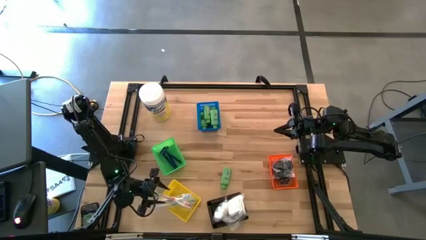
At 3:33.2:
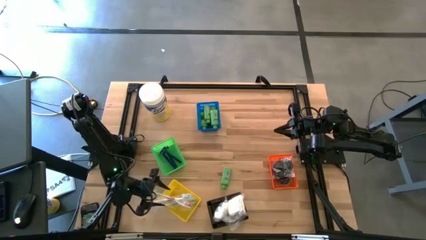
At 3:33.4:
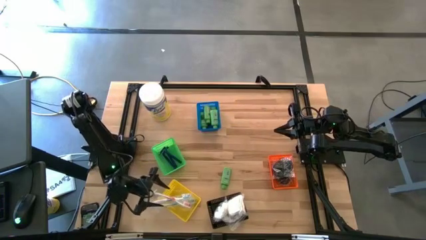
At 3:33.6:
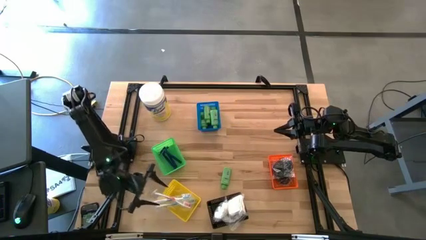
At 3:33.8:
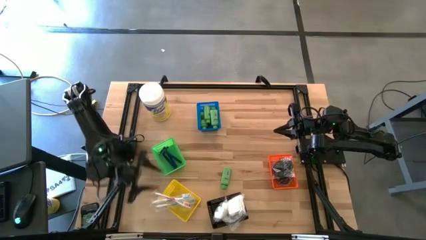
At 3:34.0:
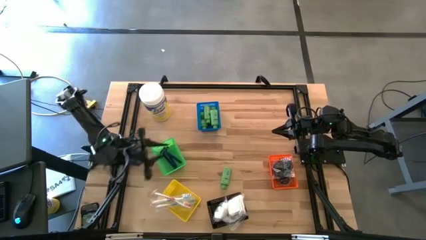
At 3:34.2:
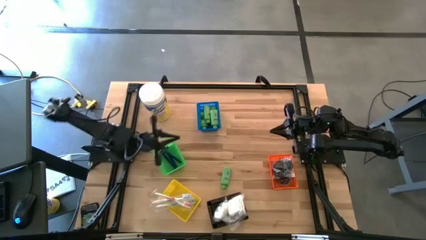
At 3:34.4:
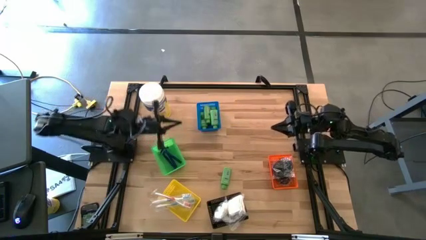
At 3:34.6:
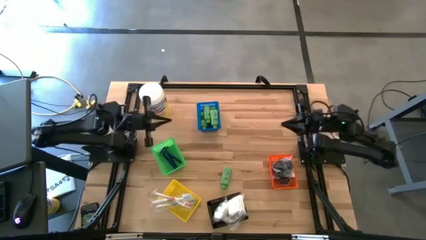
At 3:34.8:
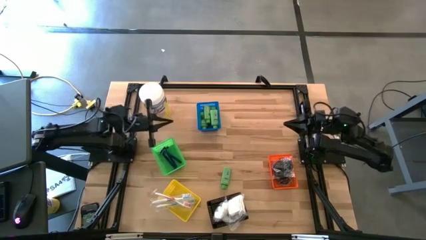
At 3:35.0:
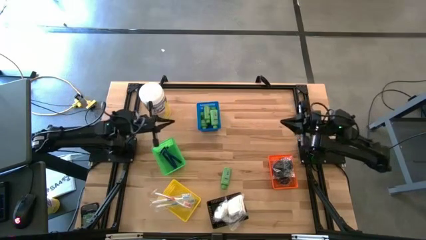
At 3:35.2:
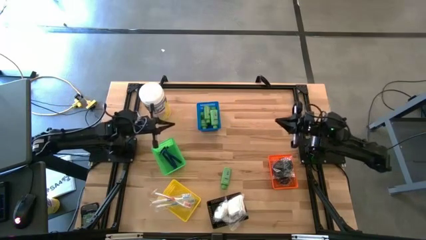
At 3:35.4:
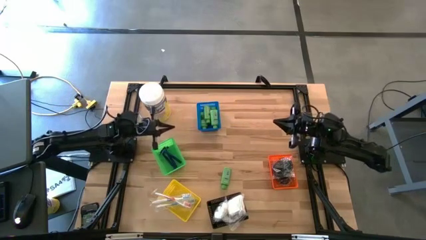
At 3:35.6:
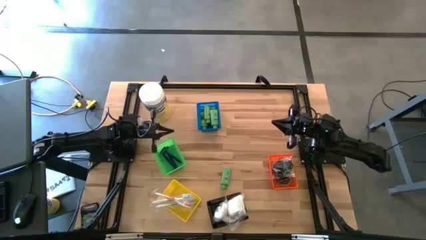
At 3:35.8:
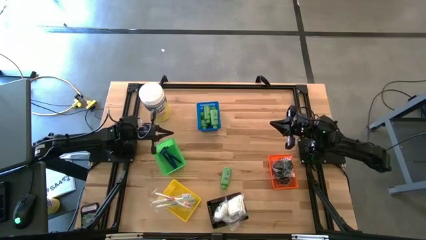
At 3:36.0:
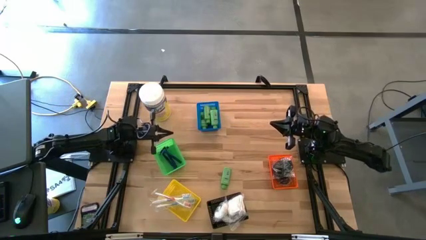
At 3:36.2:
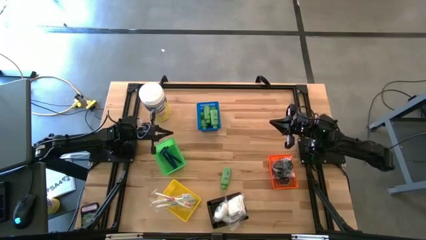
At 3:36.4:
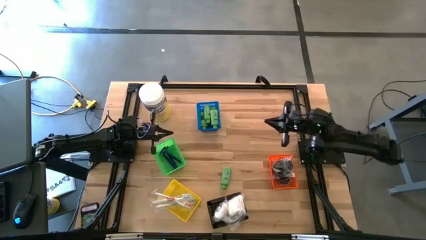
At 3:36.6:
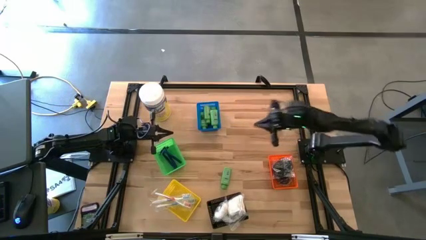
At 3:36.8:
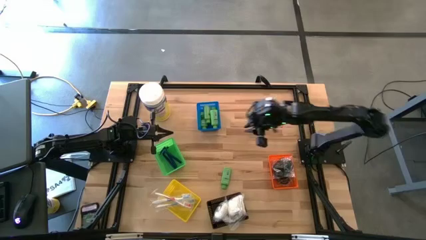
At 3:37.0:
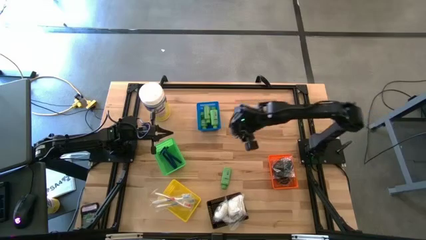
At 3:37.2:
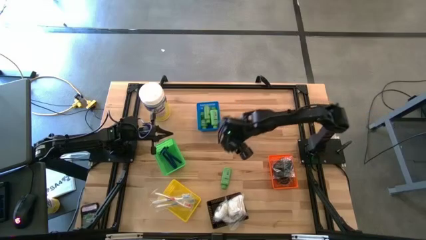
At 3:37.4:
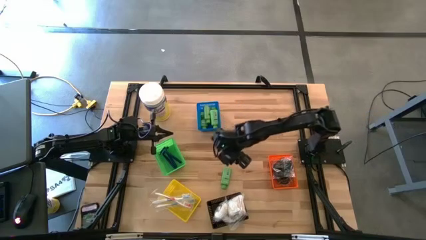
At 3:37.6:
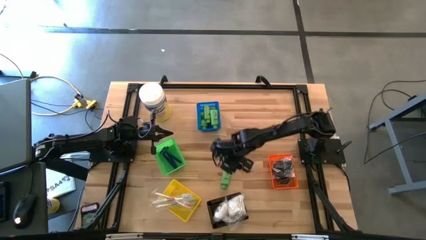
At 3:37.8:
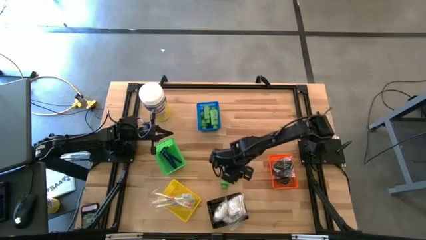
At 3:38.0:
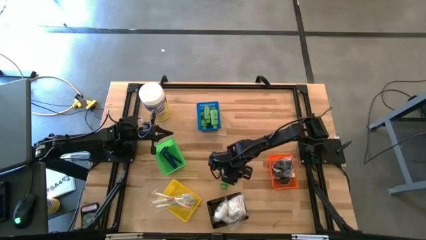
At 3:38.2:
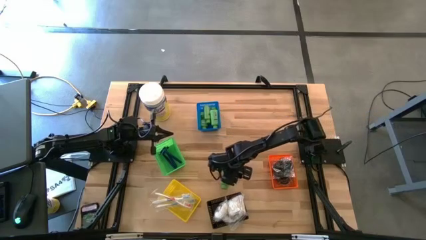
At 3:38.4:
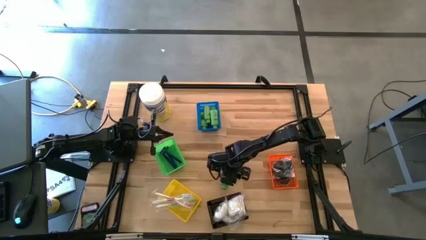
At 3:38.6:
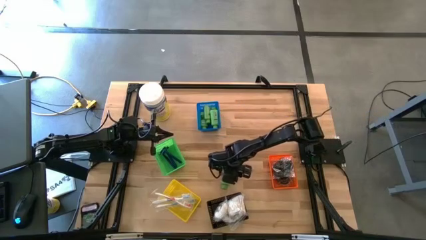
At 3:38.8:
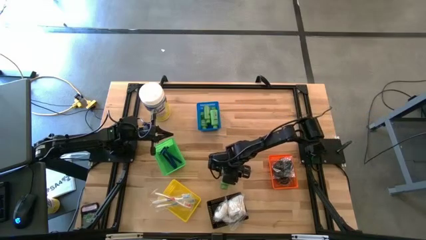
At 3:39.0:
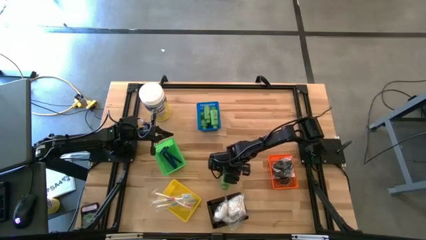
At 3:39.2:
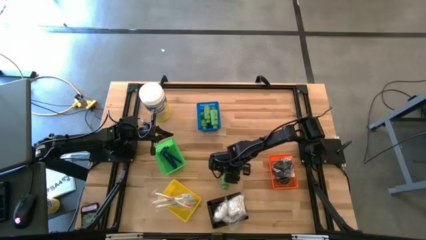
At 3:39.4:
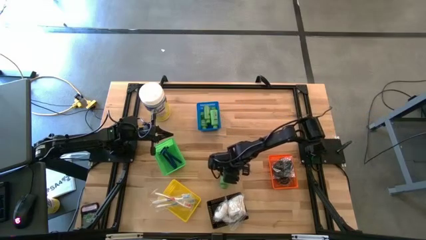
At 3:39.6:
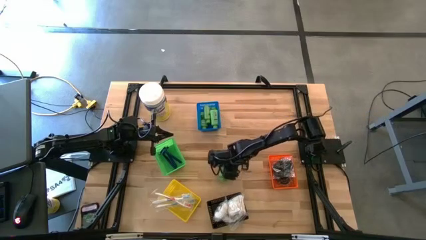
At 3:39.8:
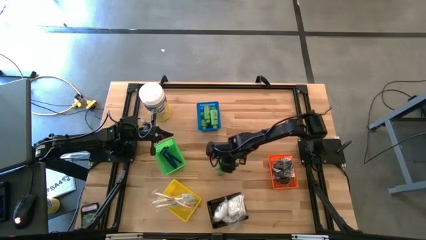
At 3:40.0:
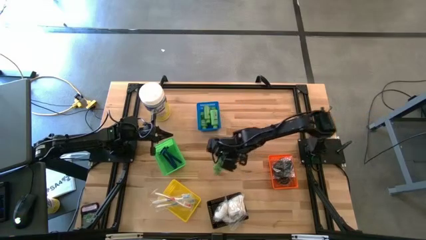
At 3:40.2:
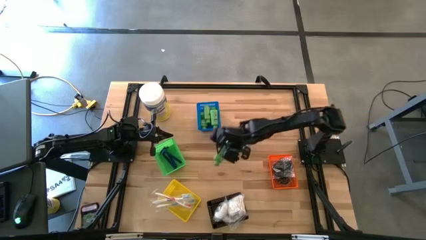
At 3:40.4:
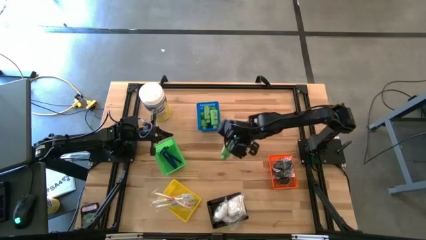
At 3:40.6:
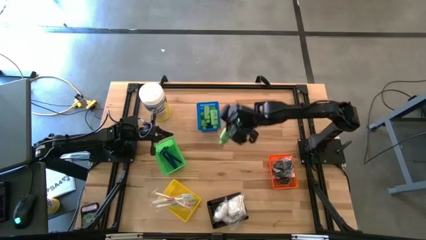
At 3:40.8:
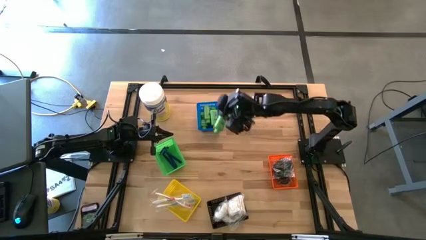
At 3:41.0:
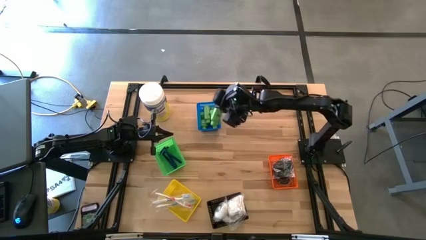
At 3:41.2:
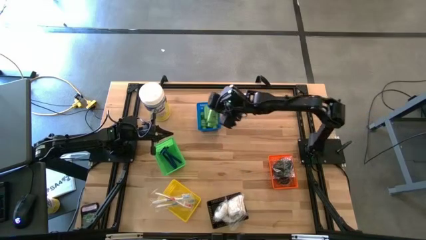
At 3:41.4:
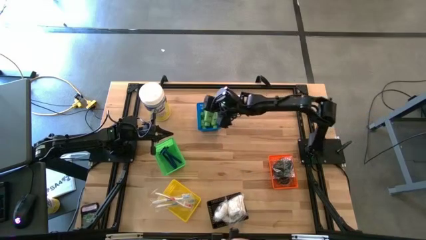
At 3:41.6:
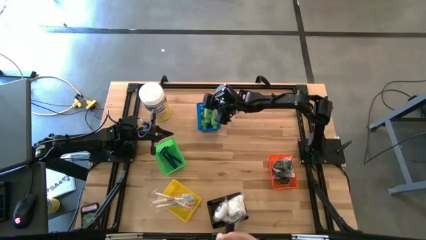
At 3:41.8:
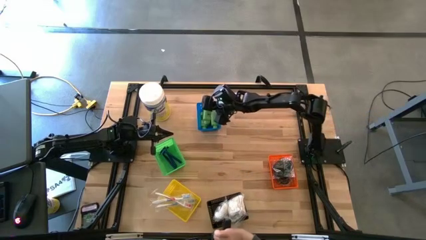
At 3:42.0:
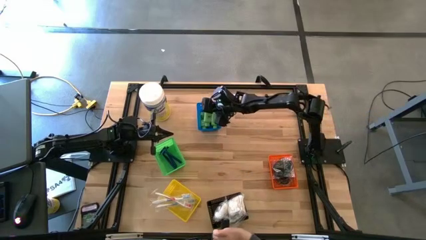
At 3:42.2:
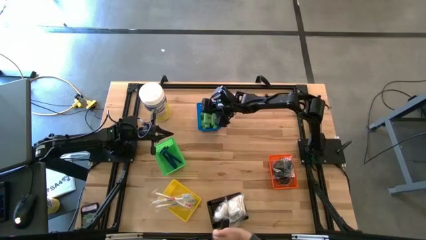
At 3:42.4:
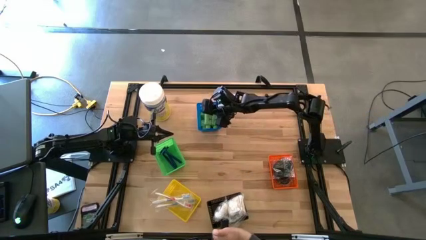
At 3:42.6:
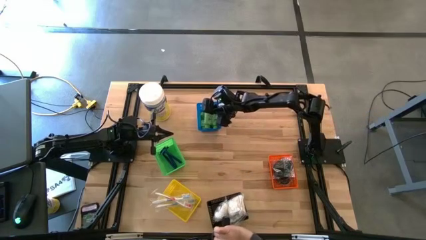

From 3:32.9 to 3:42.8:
Task: Pick & Place Travel size toiletries
Put the shampoo bottle into the blue bin

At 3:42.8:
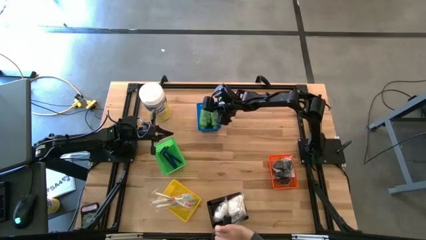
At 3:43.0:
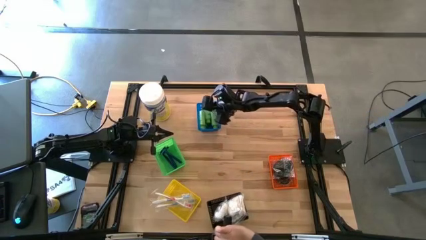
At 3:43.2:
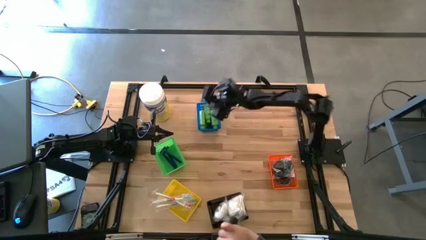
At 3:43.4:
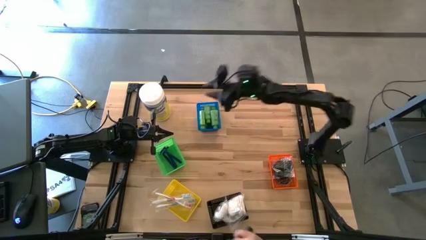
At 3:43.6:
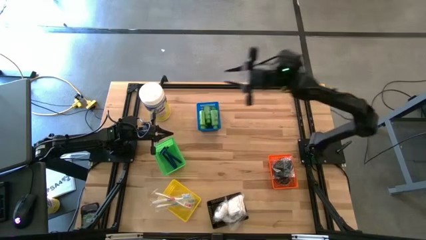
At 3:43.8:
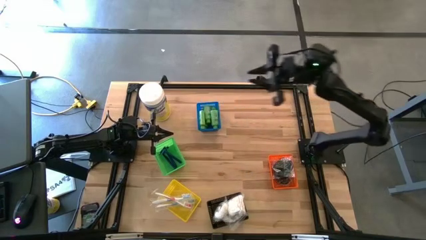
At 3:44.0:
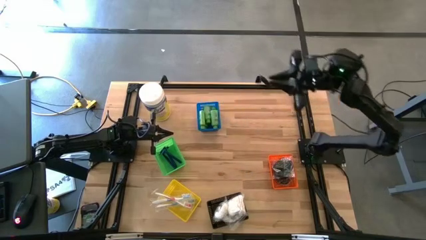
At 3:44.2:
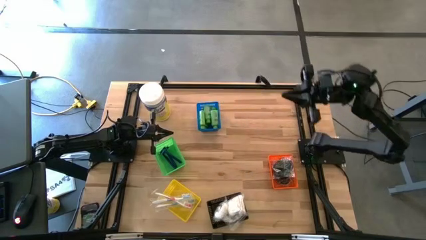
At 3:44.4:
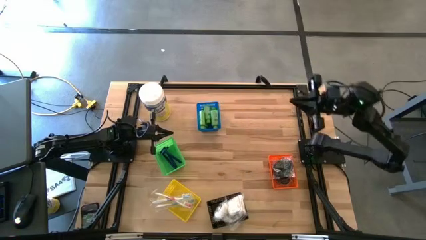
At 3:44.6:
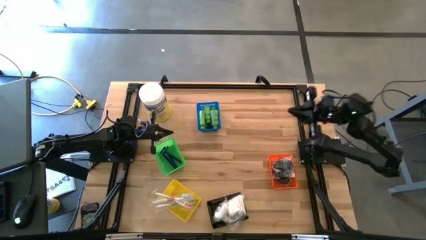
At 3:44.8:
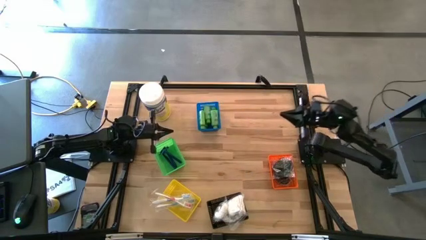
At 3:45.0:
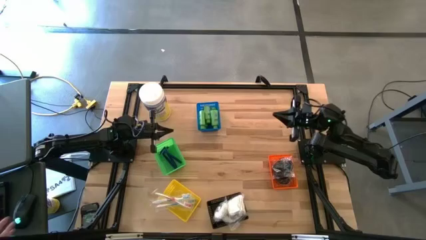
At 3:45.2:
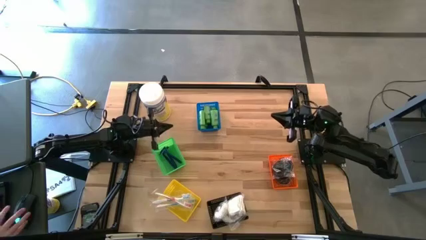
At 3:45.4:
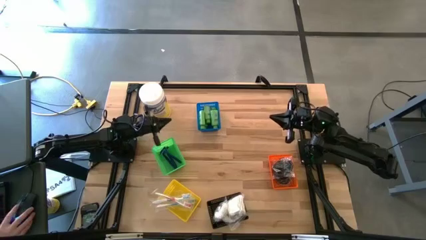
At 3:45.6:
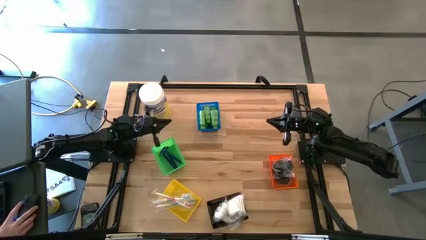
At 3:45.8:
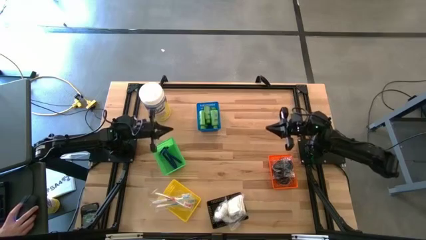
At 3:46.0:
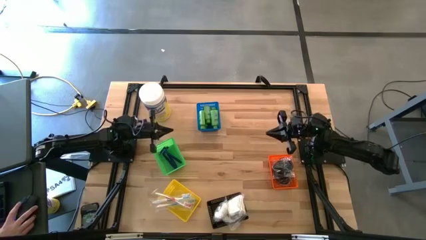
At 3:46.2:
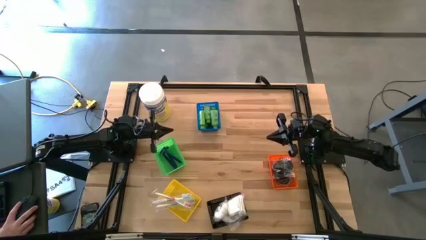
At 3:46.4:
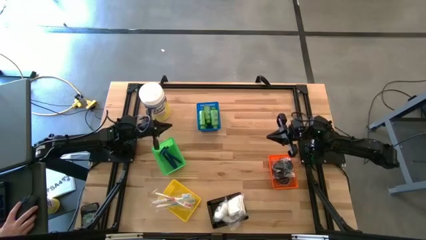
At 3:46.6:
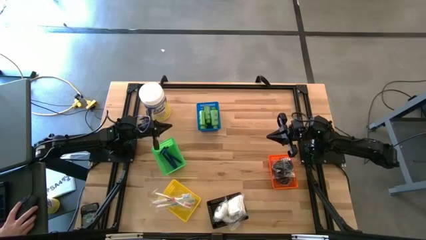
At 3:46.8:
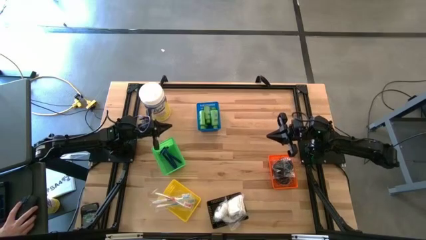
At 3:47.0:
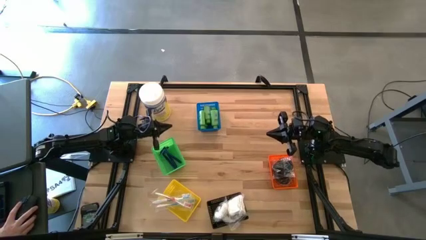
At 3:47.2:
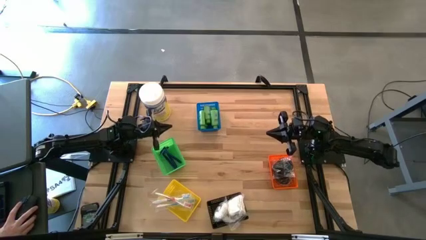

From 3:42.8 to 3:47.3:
Return to Home Position

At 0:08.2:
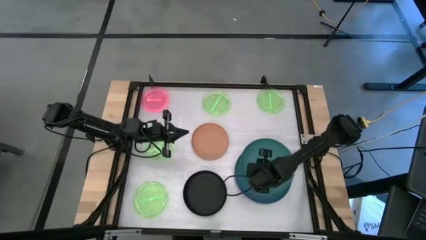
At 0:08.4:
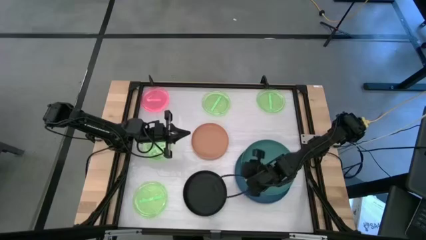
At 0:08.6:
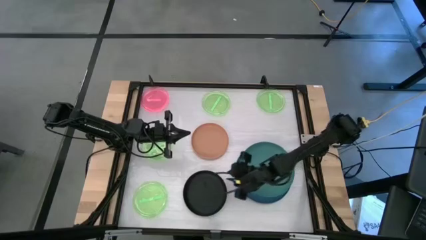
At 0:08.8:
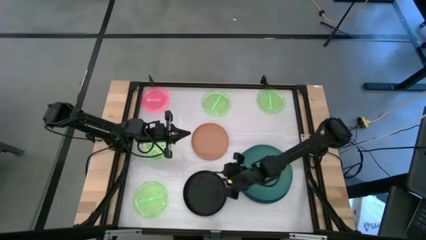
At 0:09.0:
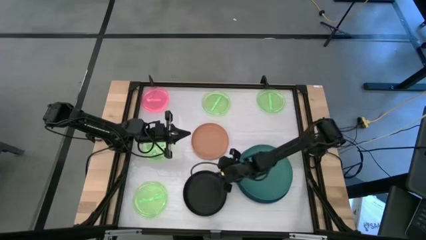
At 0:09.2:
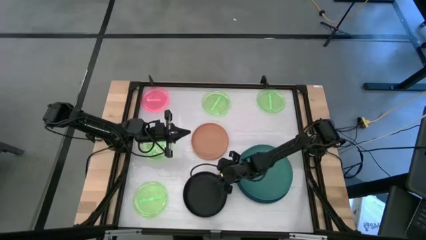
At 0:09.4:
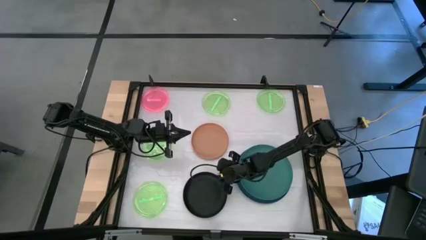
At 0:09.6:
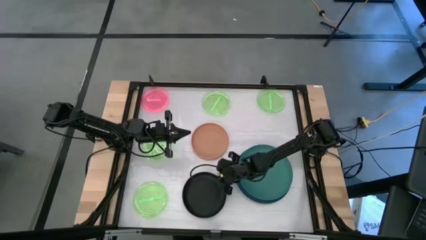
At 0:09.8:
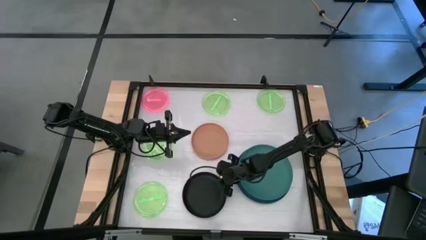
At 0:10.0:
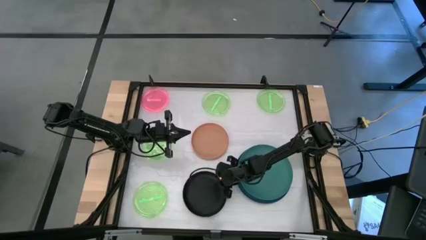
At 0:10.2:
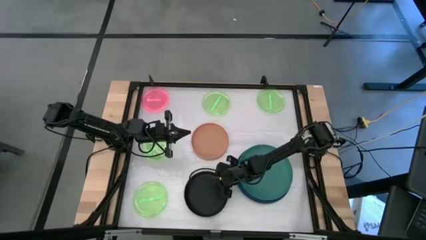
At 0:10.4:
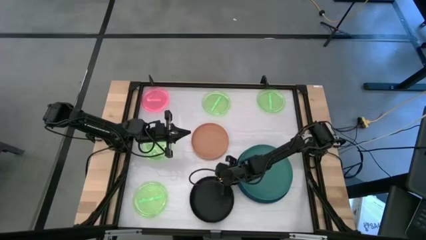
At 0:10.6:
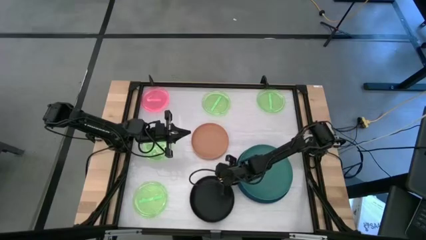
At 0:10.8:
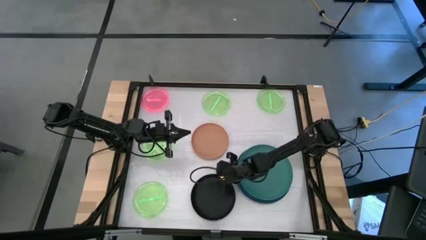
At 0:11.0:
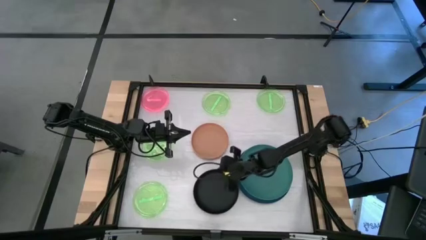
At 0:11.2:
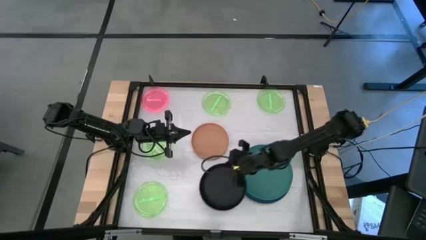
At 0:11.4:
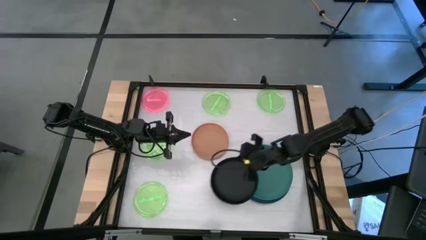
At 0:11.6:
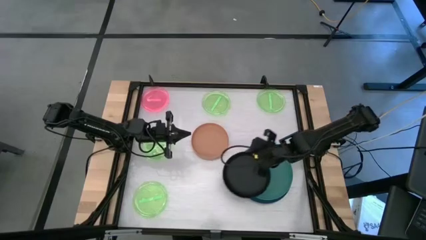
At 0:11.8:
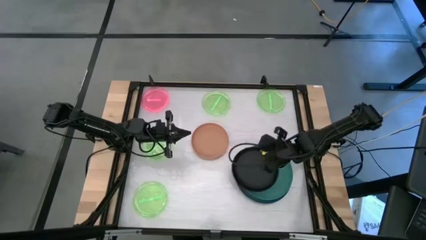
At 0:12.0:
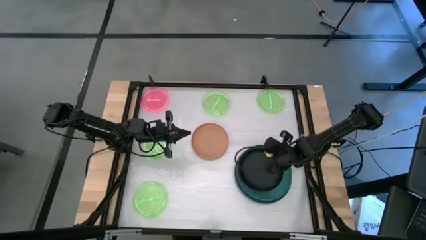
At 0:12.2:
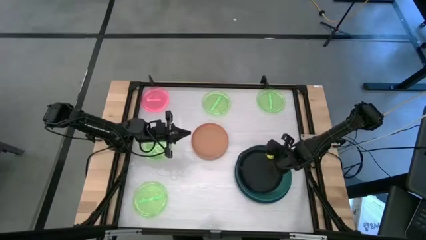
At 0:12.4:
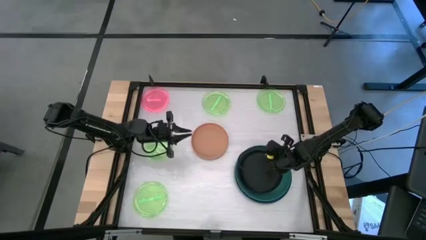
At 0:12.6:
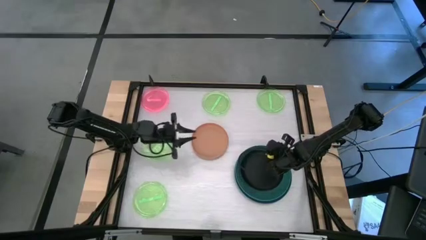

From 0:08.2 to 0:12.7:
Task: Stack plastic plates
Stack the black plate on top of the green plate
